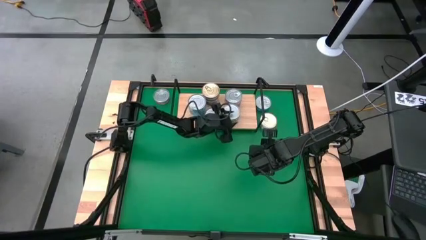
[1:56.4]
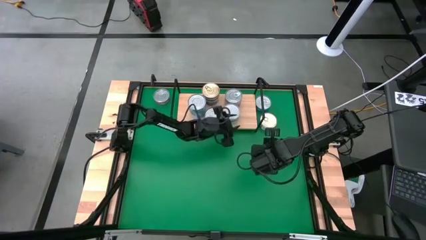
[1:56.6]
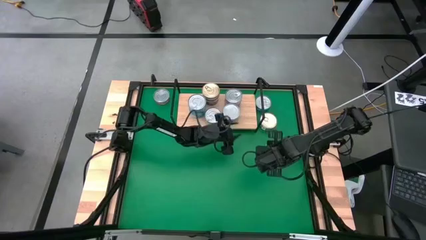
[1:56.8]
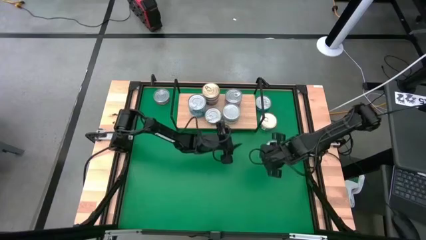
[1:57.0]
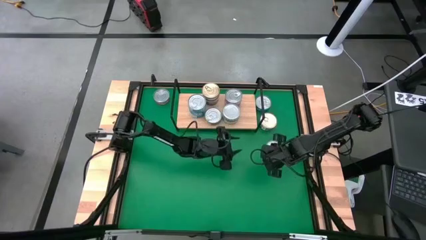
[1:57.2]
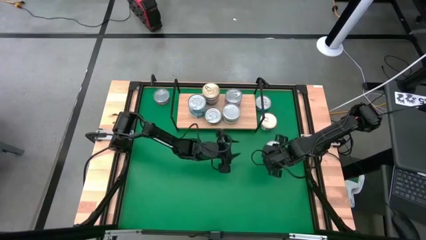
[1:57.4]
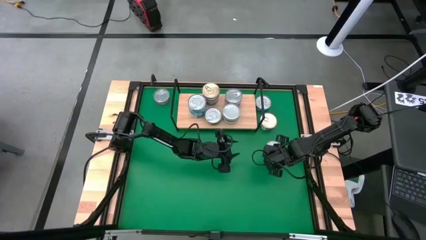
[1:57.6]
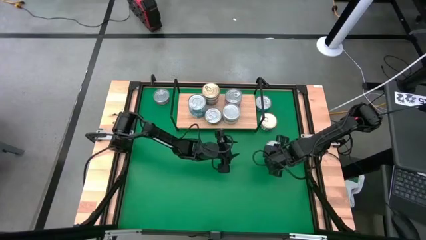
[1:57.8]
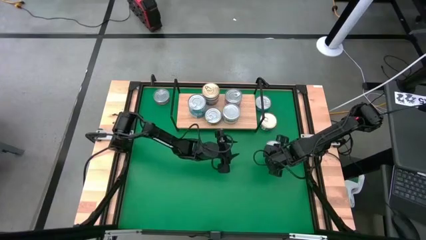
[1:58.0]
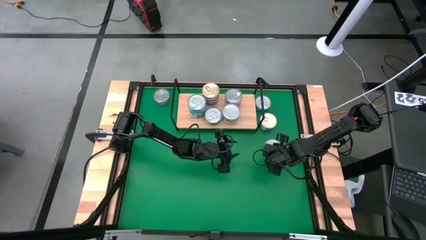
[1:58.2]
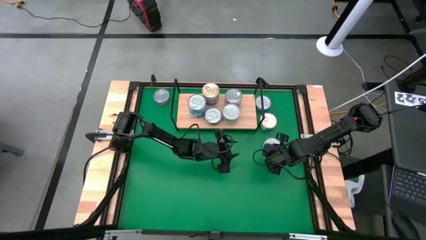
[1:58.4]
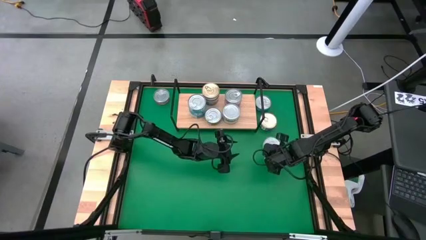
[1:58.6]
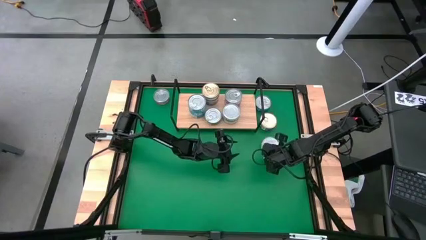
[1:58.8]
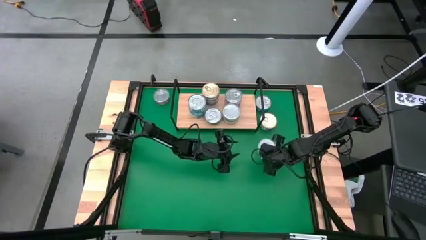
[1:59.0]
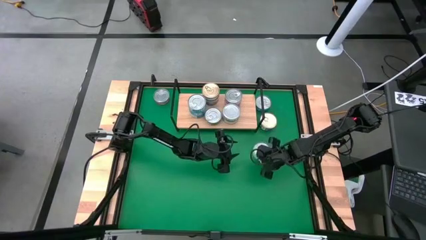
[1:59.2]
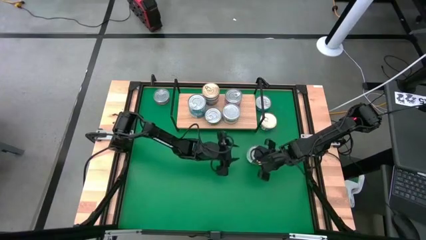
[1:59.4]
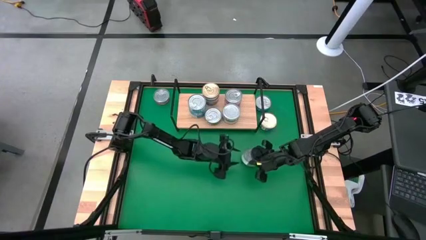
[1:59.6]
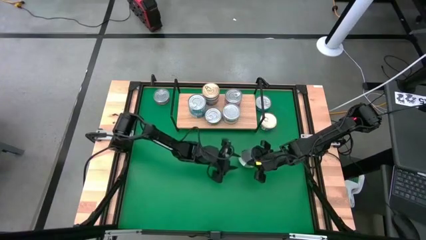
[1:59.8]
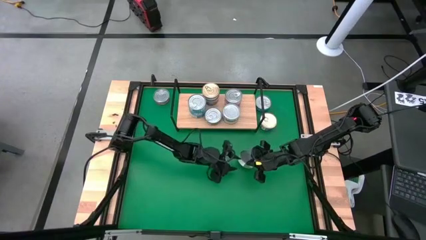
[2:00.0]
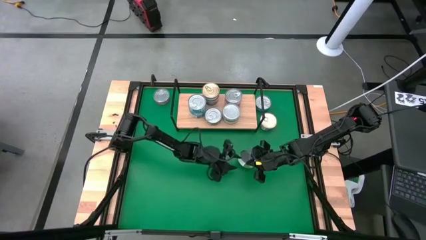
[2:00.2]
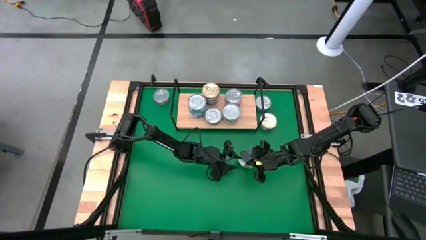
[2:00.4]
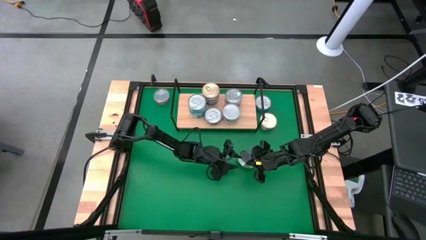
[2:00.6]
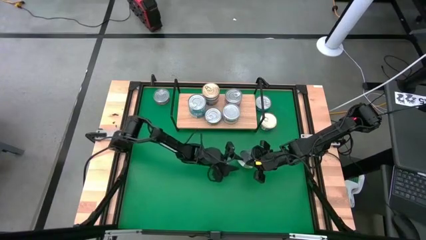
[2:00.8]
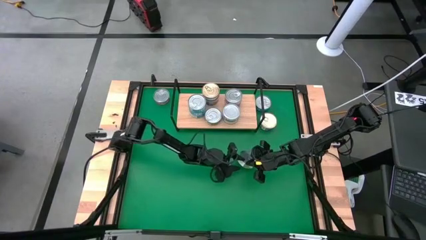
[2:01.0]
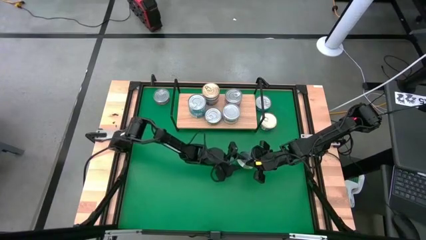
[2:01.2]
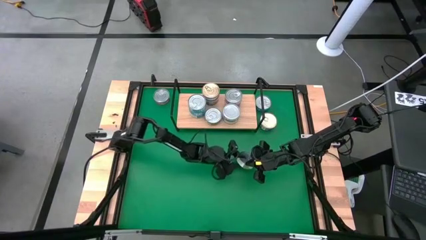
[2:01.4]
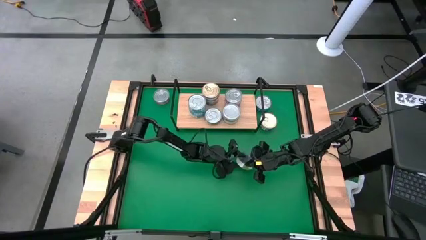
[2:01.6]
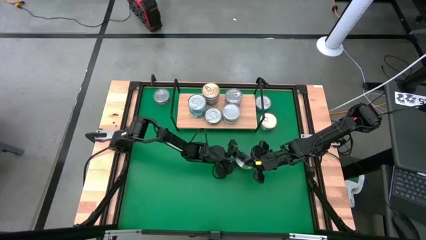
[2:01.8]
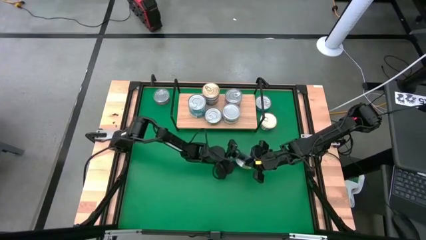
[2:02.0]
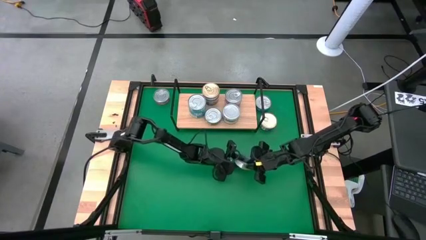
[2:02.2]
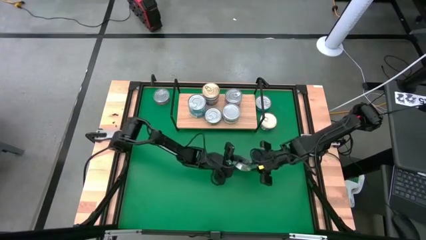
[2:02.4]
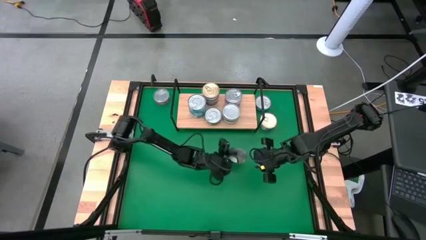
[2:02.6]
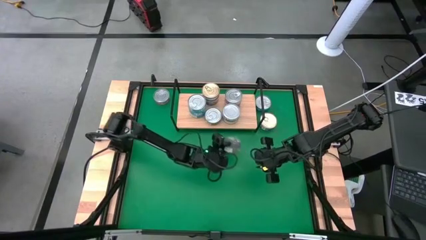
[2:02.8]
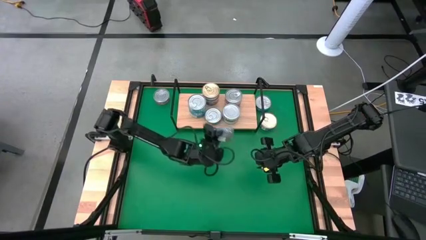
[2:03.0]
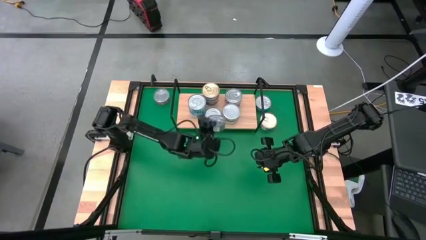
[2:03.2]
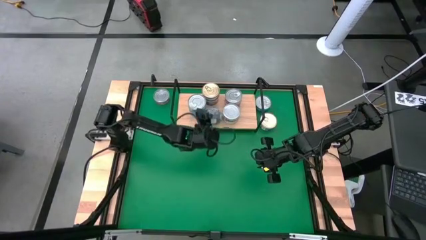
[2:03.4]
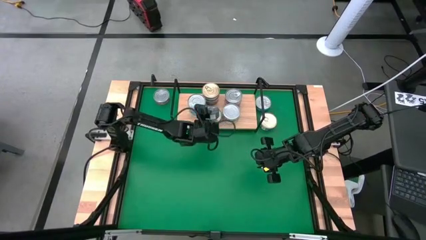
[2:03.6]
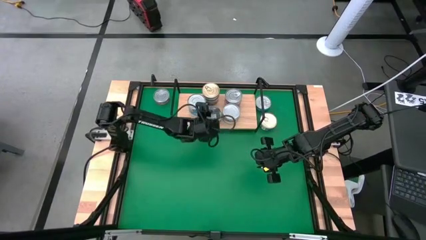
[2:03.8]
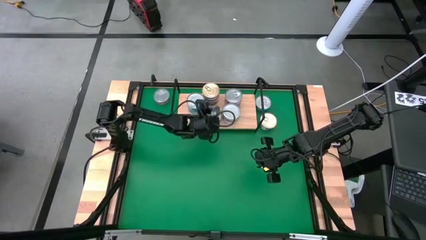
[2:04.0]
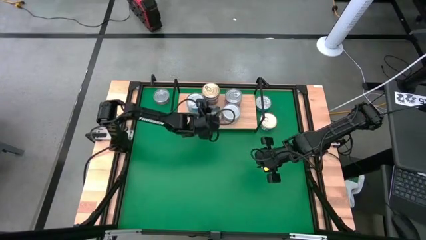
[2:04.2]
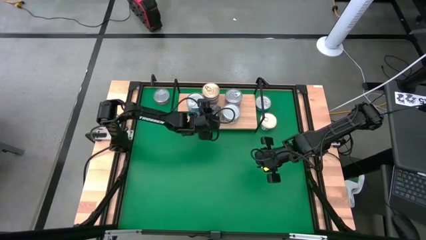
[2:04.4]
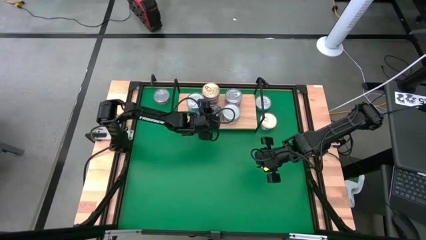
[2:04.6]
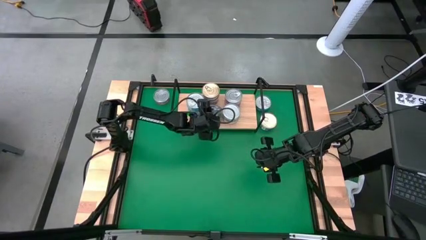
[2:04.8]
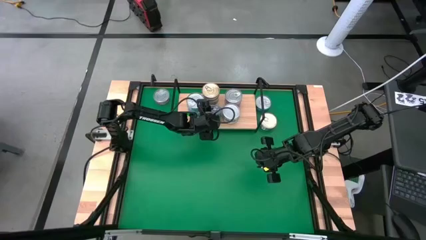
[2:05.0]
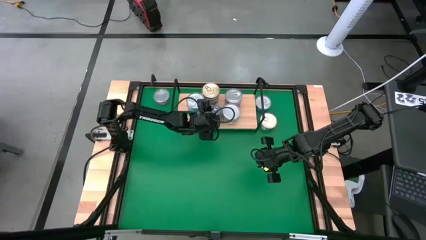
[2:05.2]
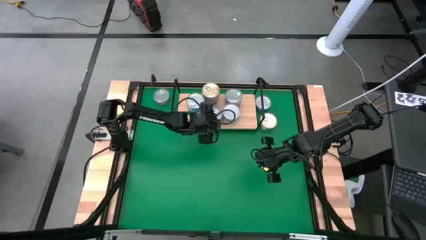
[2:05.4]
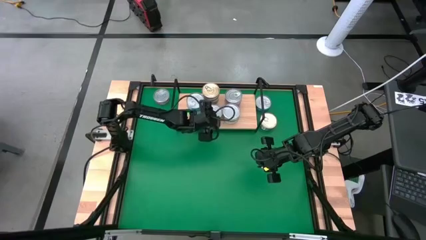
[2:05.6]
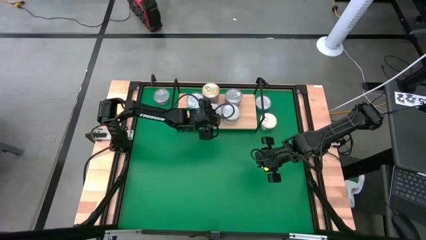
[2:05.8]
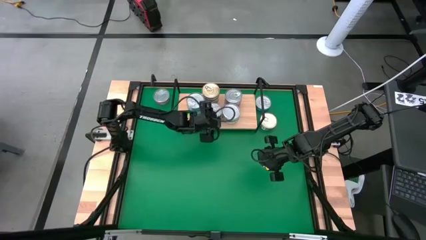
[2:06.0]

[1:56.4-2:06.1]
Task: Stack canned seafood by type on shelf
Stack the green tuna can on top of the green tuna can on the shelf

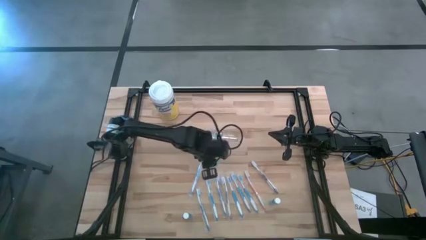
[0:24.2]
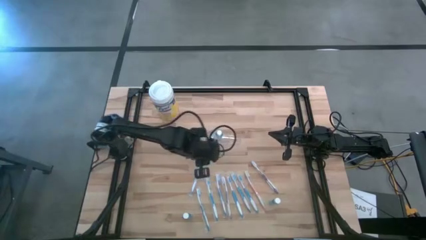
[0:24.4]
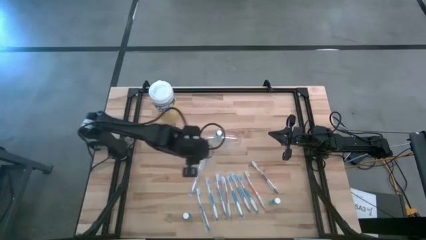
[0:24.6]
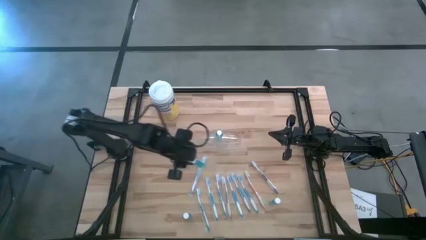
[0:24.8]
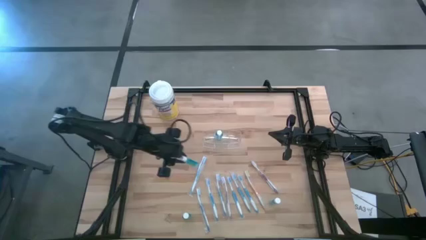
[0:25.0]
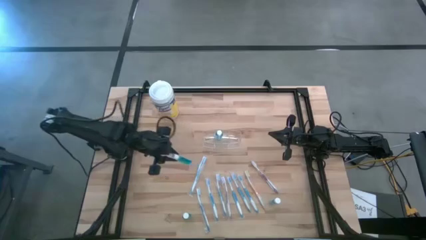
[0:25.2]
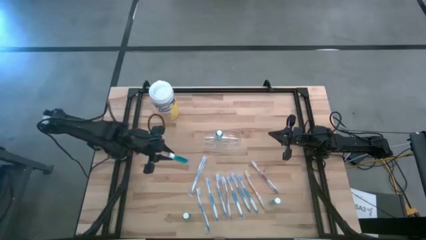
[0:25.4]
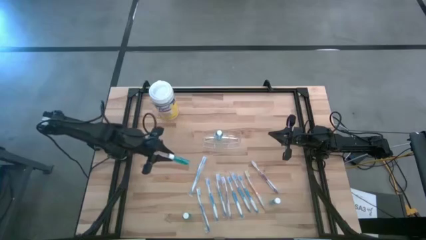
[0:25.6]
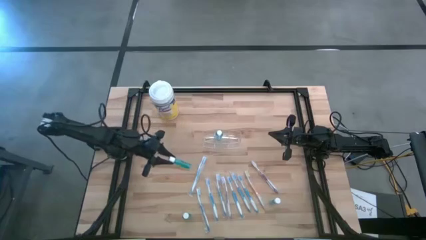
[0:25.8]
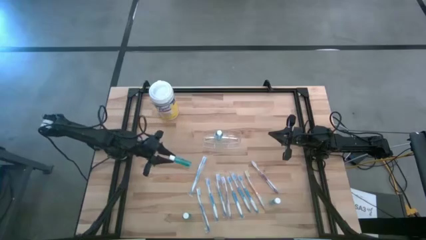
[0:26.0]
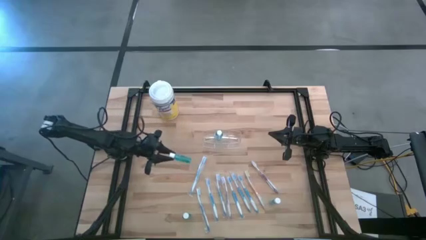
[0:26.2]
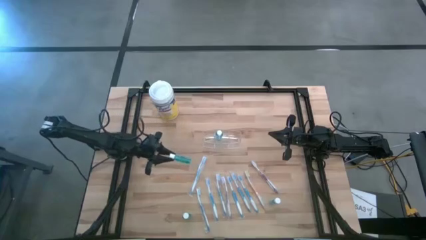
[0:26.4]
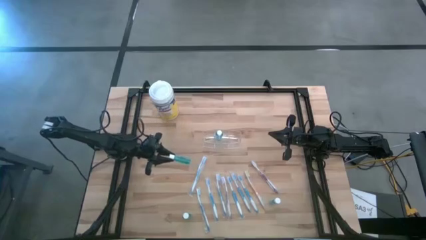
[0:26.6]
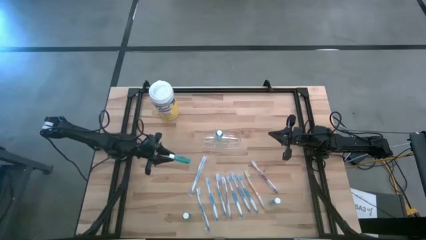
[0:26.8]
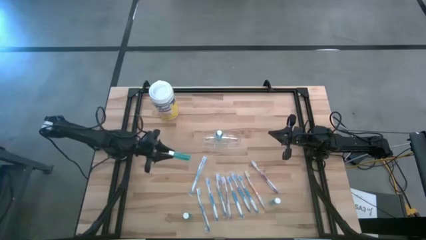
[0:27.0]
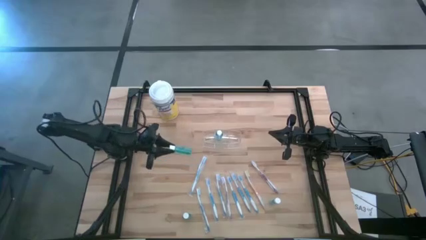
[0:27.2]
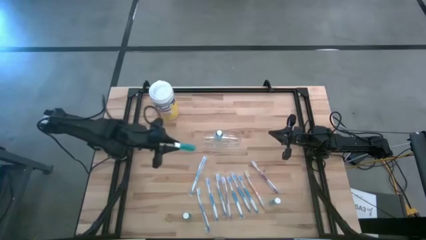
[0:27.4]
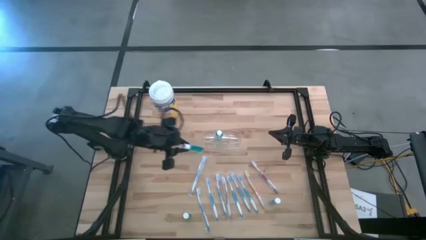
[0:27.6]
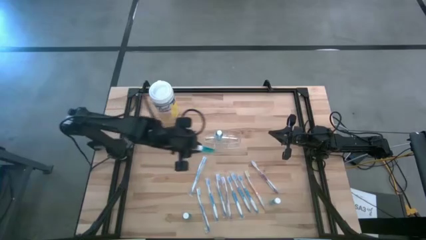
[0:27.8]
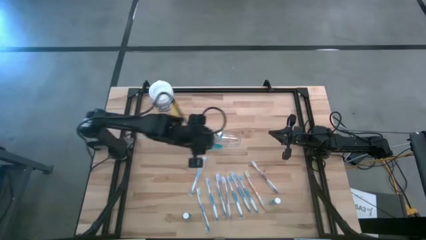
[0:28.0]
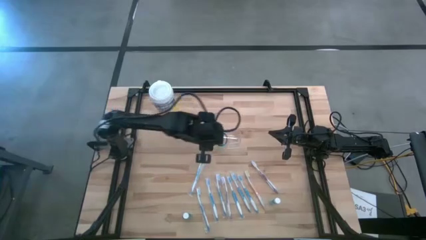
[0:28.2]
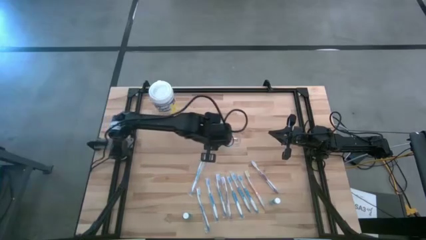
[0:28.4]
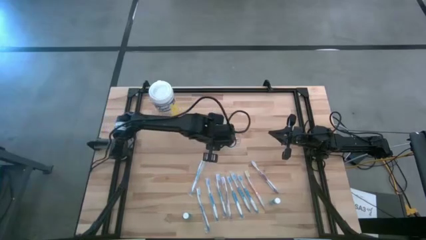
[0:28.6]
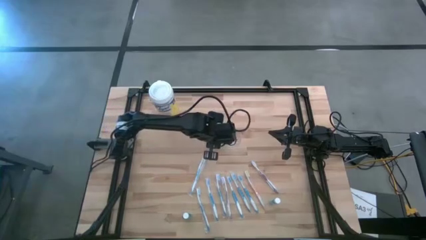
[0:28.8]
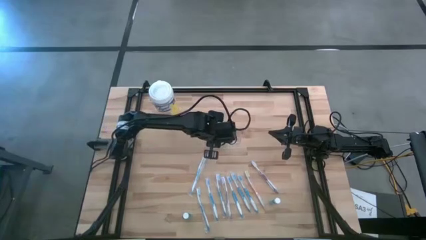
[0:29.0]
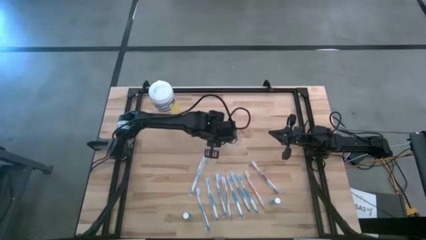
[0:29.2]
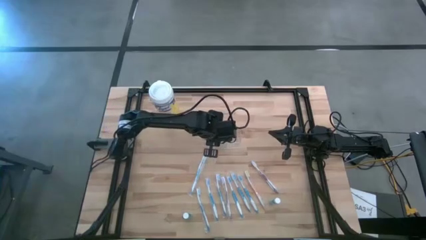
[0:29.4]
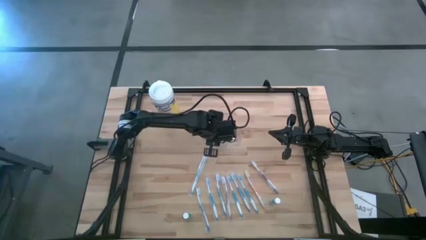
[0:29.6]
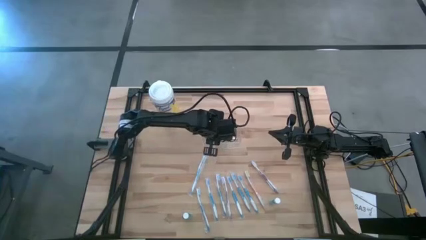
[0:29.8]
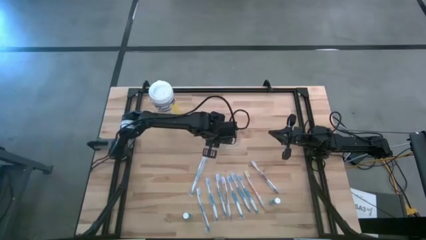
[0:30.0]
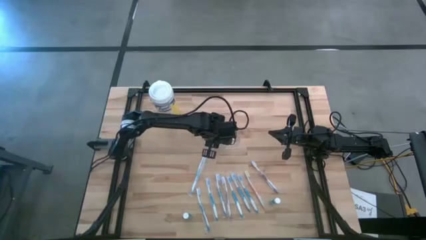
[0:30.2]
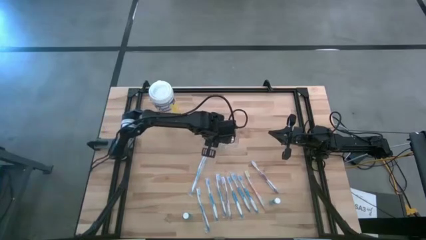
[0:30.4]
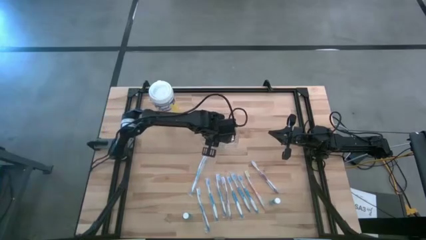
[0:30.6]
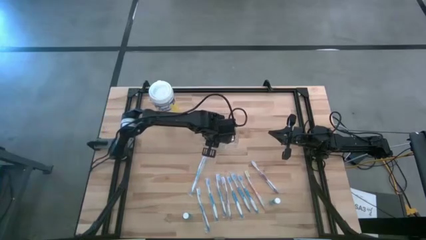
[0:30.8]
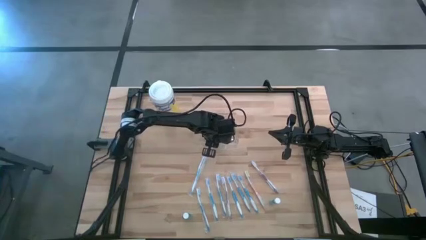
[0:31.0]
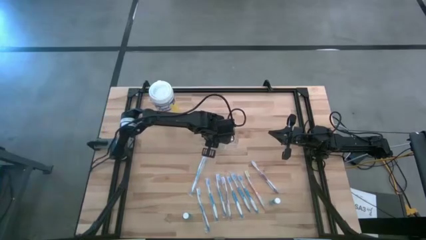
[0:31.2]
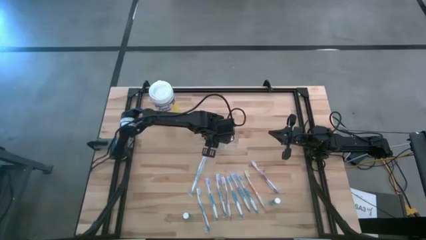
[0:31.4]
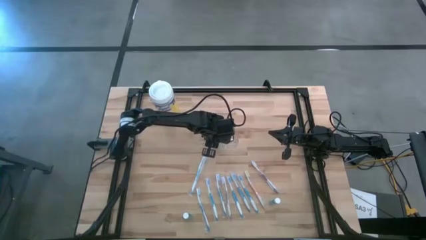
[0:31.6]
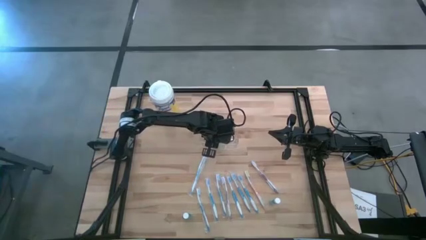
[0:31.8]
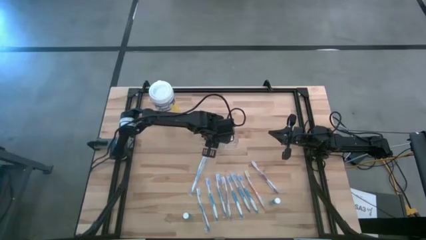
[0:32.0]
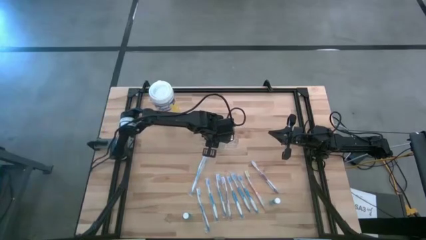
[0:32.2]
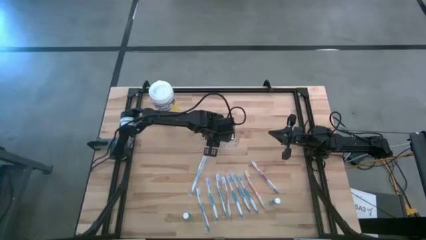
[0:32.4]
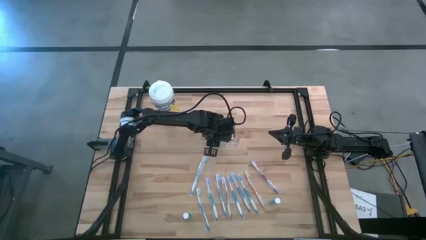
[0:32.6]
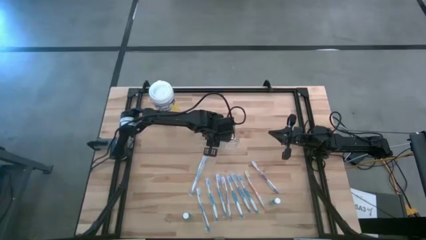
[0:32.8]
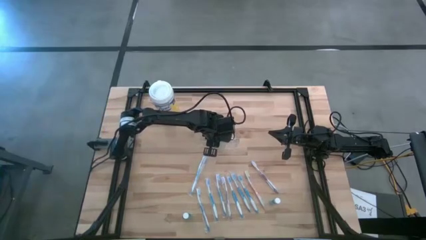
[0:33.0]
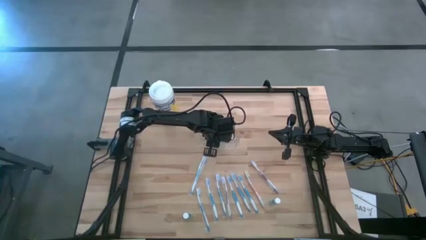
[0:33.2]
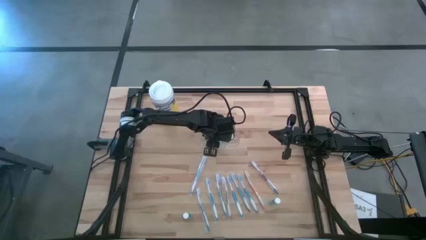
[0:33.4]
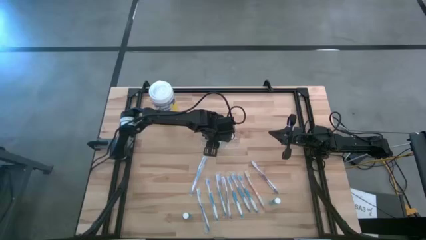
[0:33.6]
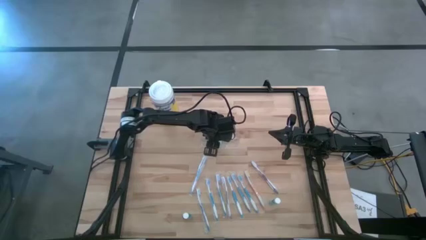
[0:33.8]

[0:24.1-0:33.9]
Task: Pick & Place toothbrushing station
Put the blue mouthwash bottle into the middle section of the transparent organizer
